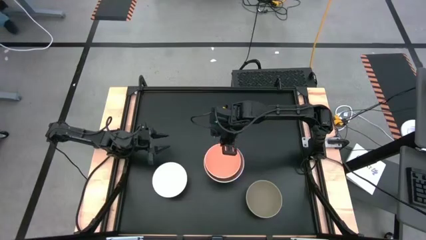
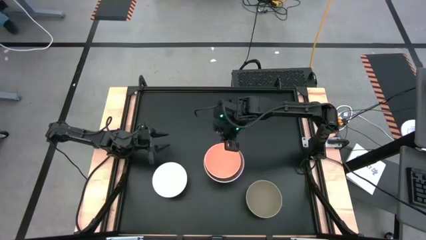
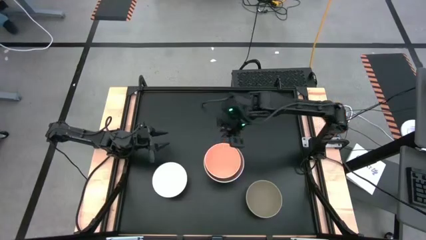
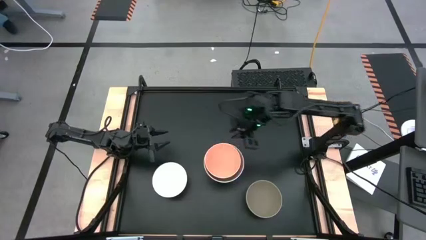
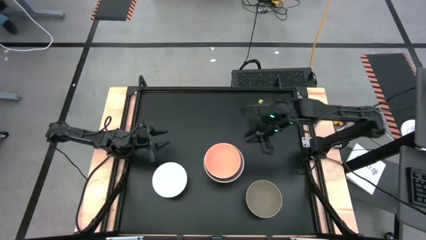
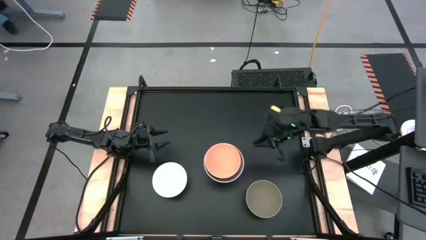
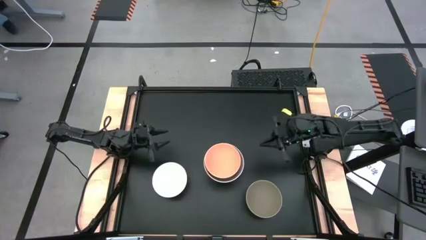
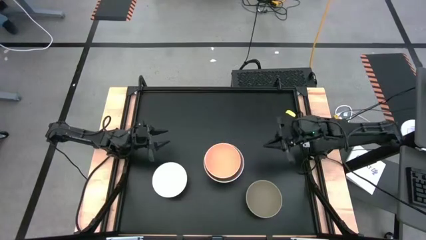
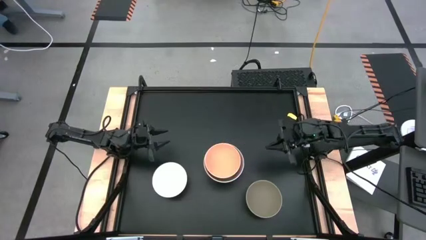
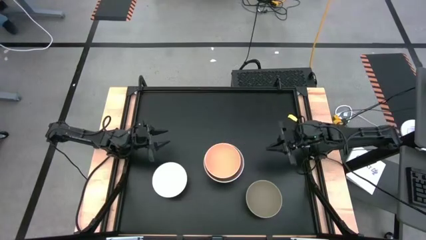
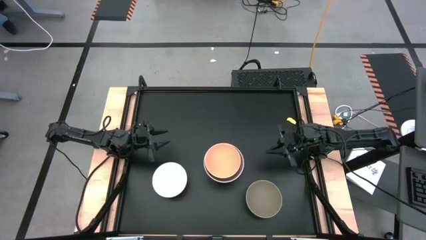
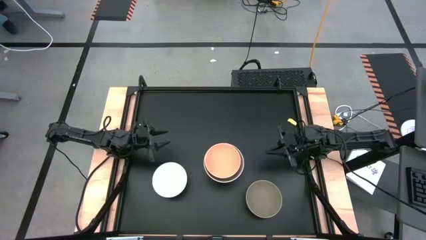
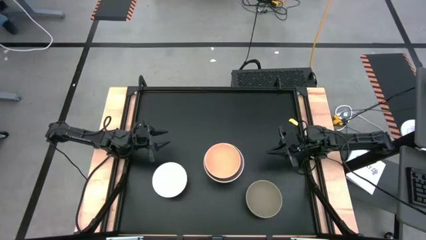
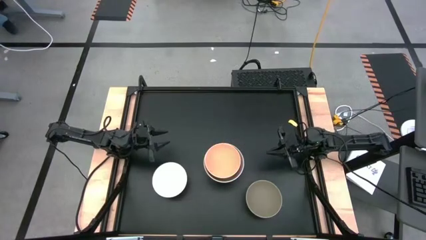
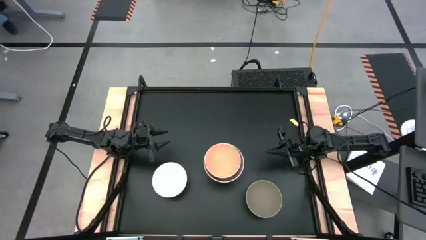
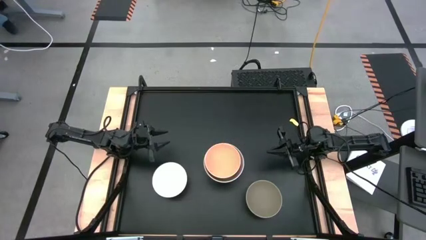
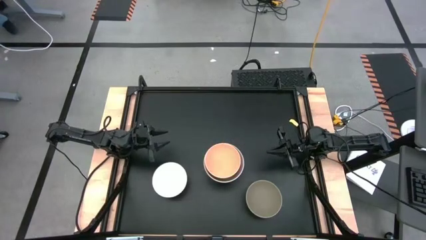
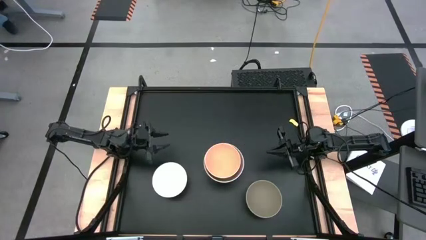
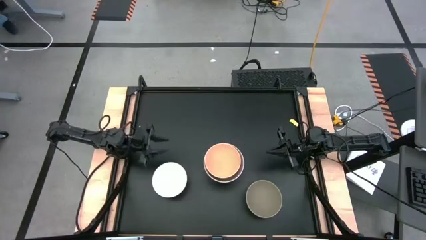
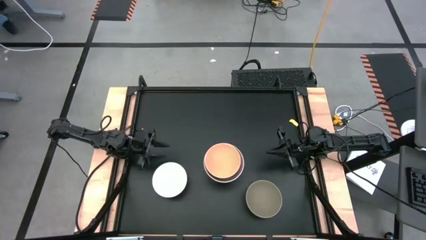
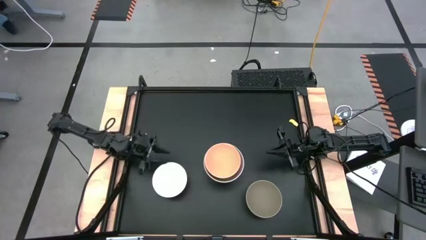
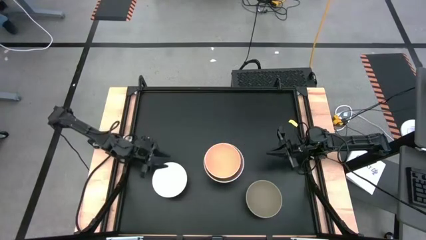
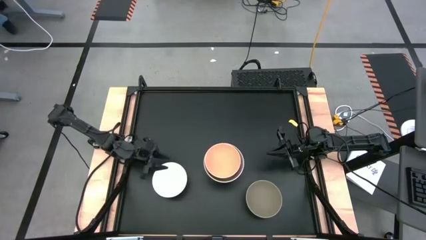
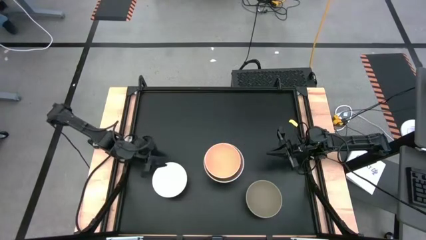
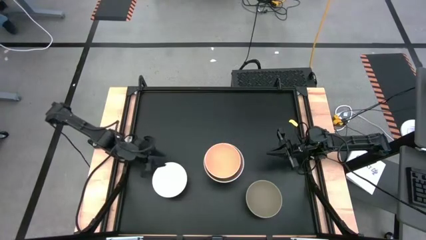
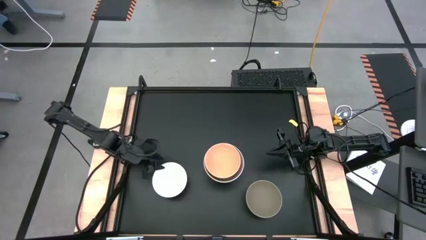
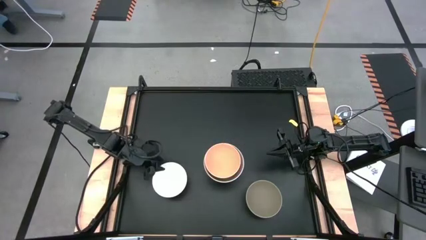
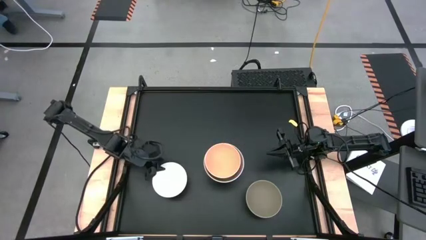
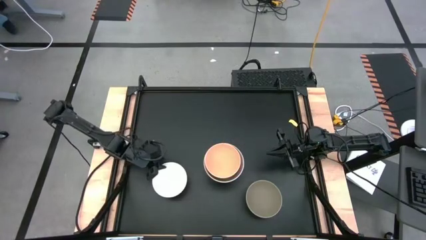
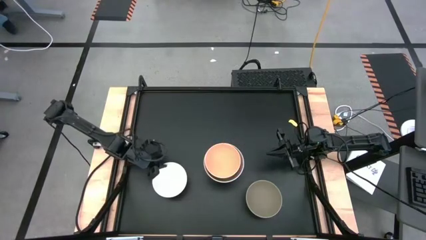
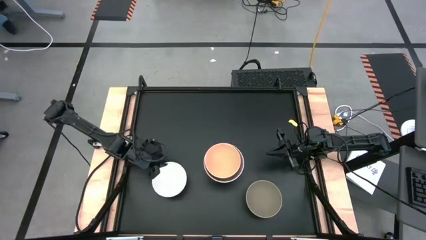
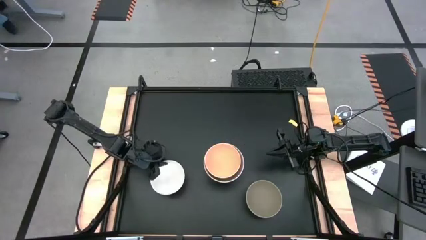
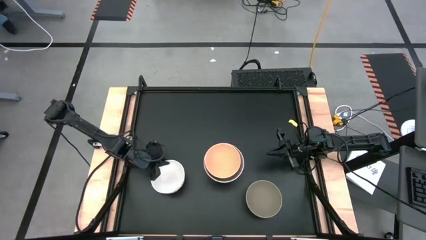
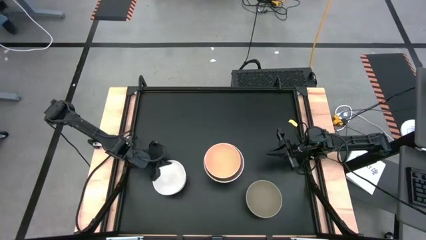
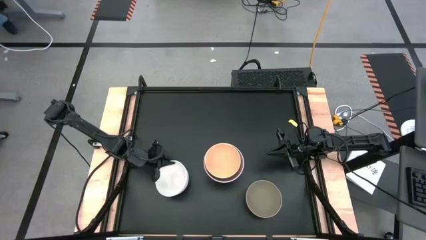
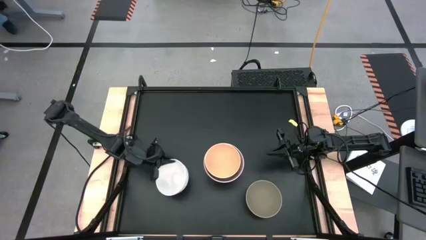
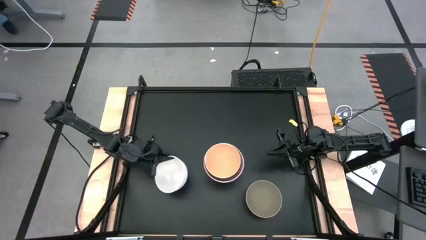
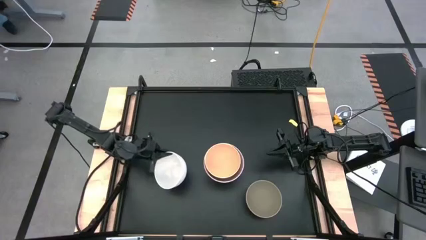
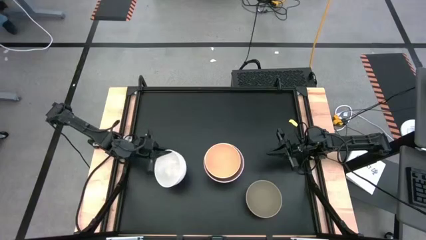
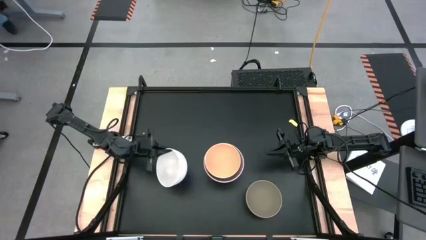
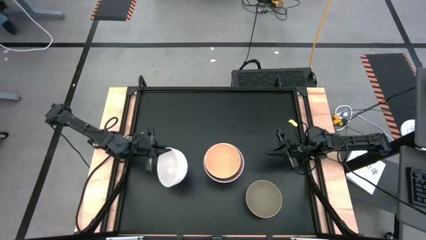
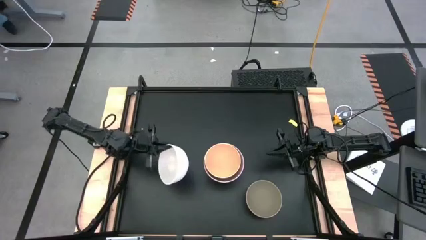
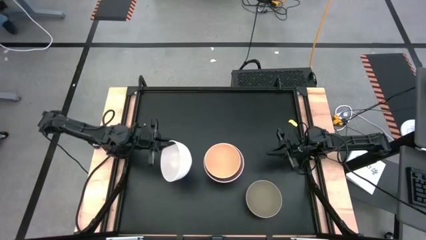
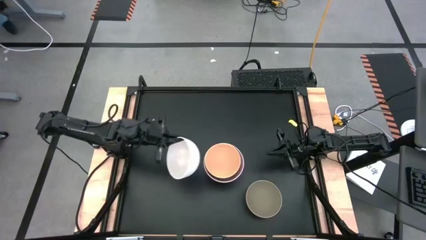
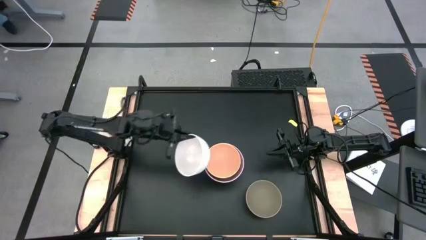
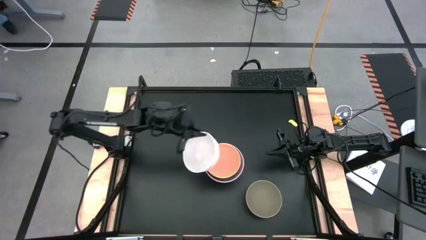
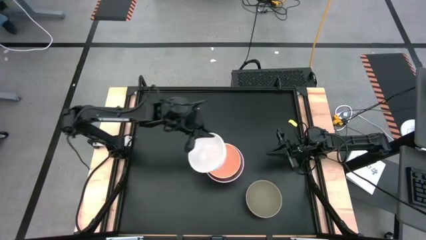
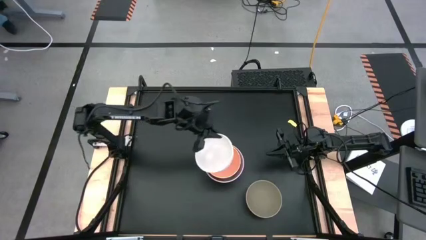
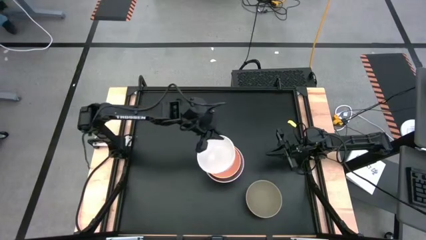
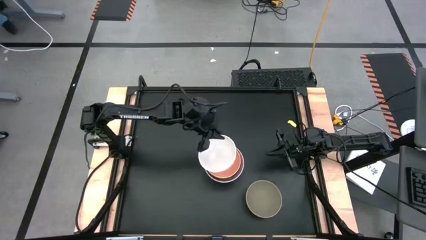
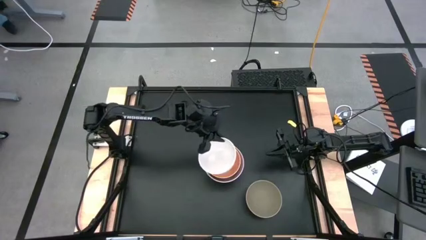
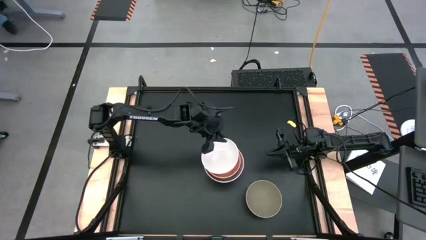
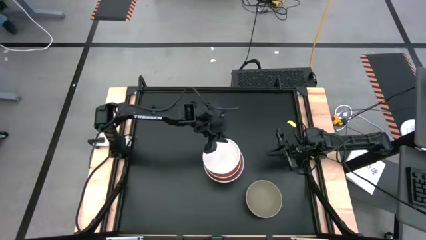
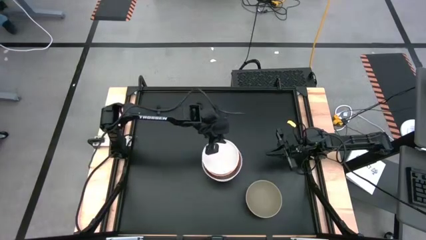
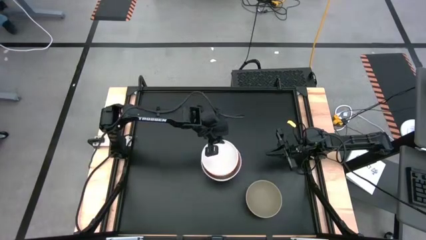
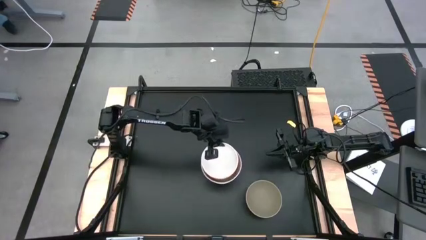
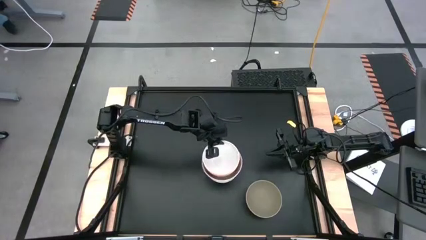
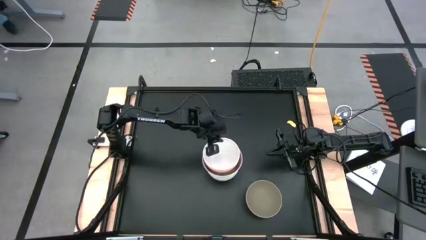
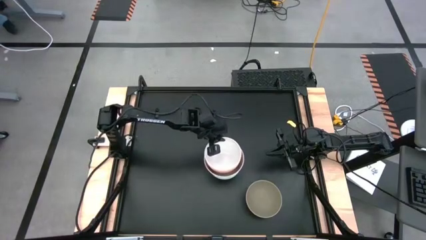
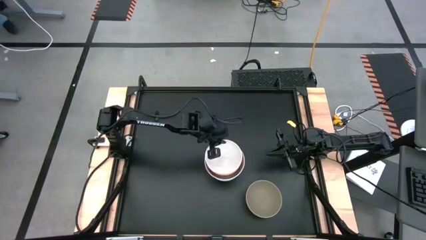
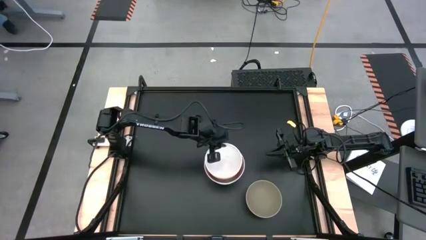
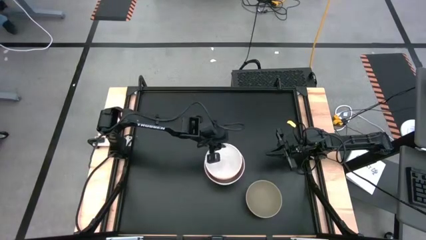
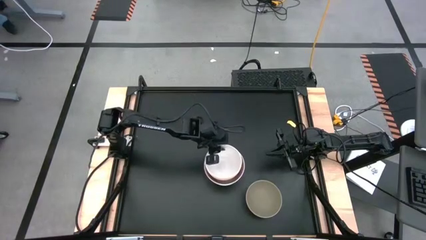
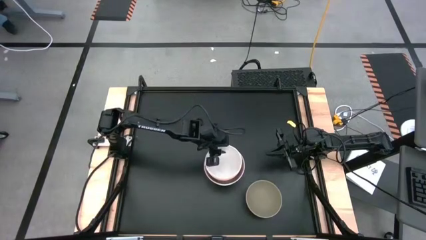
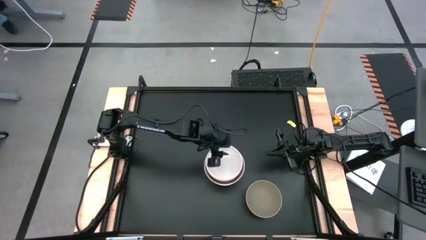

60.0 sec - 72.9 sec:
Task: Nest bowls inside each other
Stack the white bowl on the orange bowl

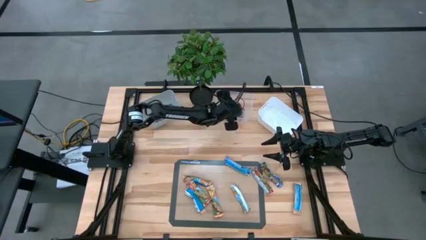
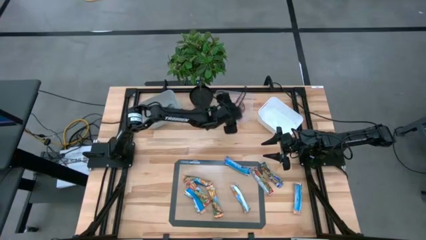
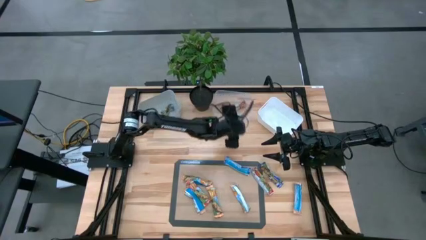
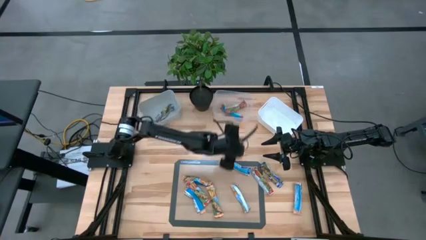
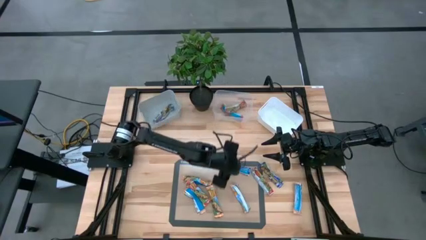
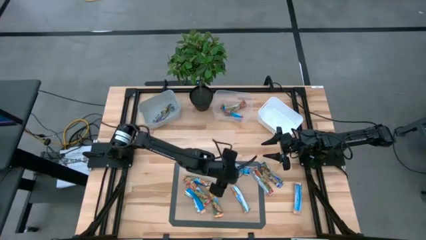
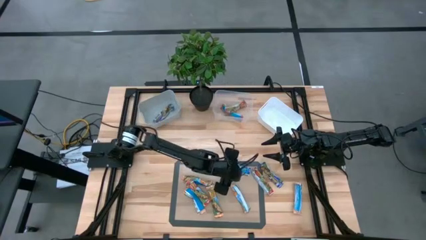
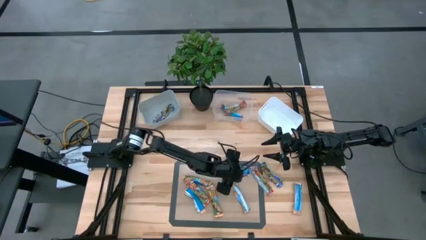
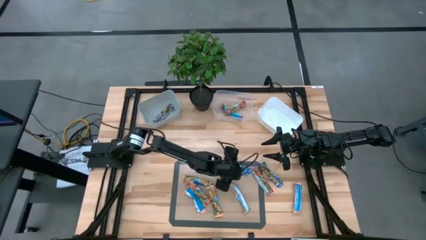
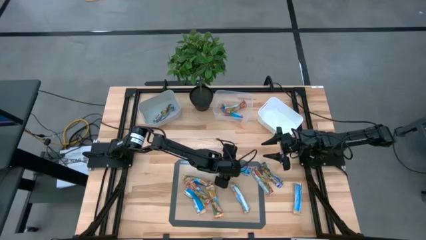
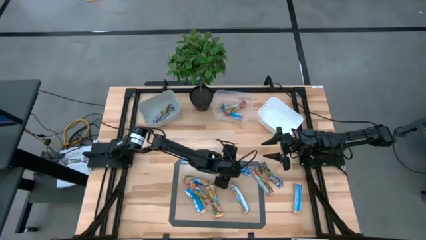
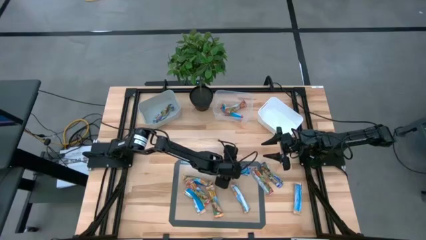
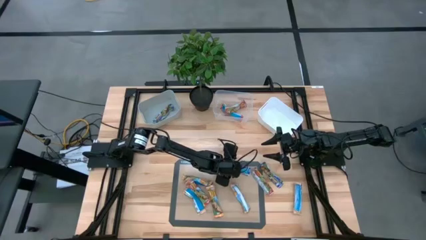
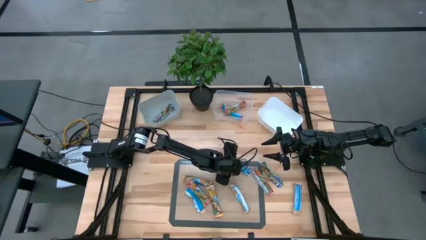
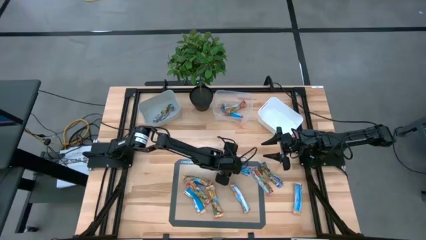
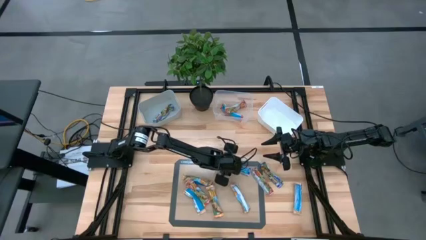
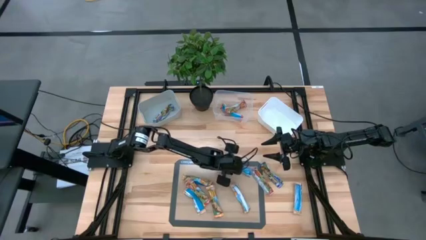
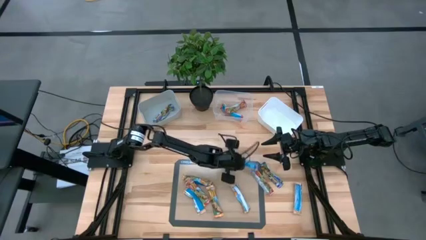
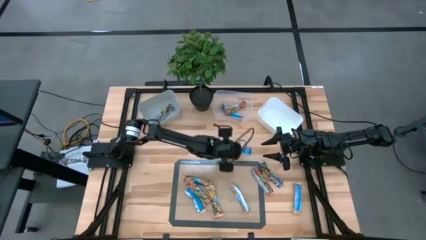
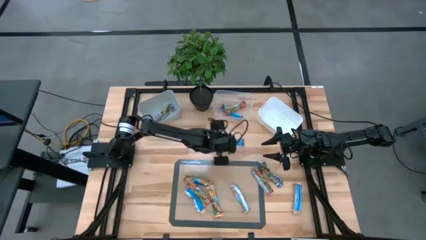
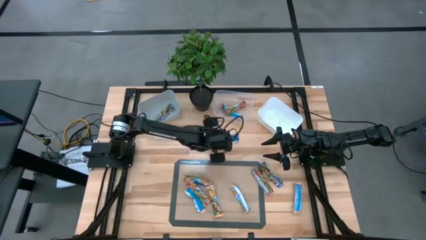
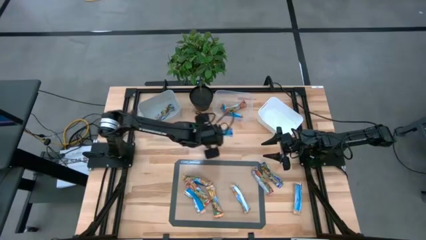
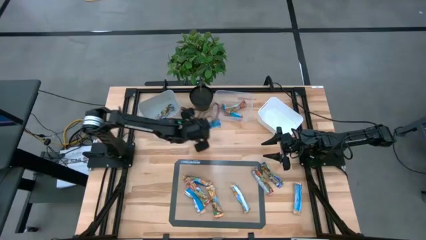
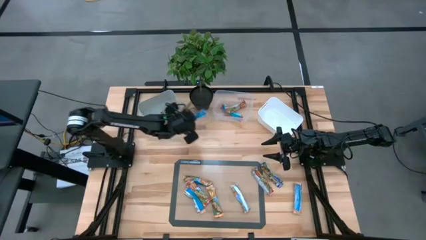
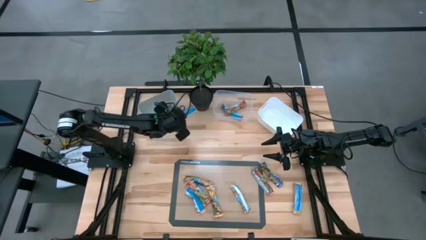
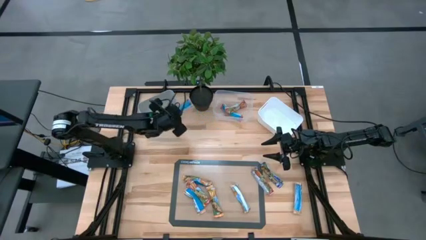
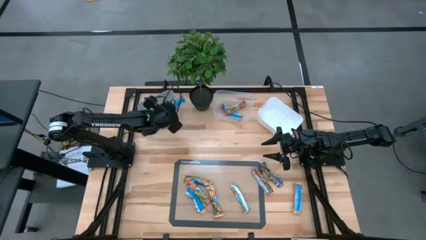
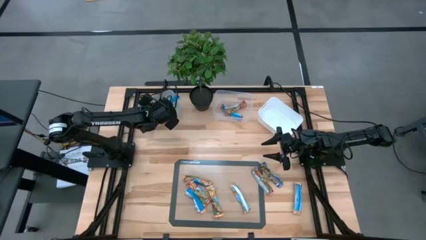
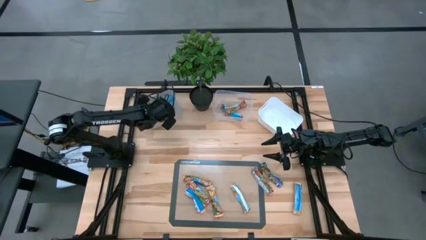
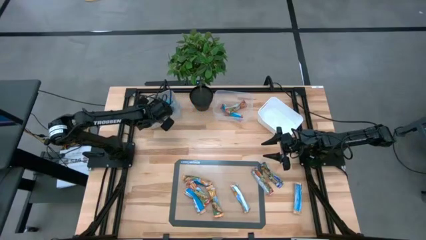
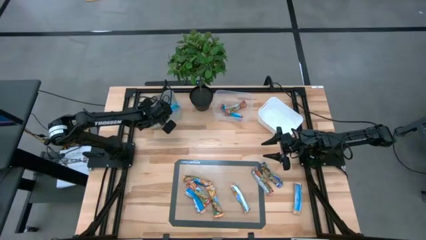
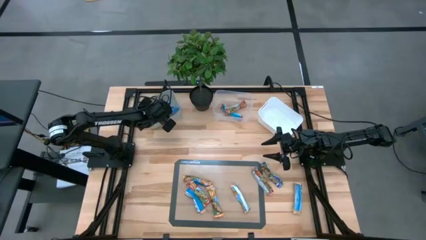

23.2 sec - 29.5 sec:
Task: Pick and place Granola Bars by type
Put the blue granola bar into the gray bin
